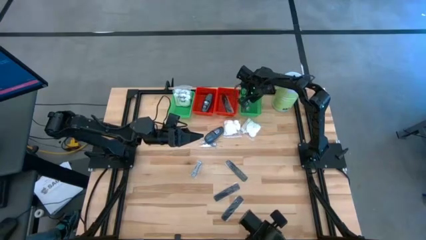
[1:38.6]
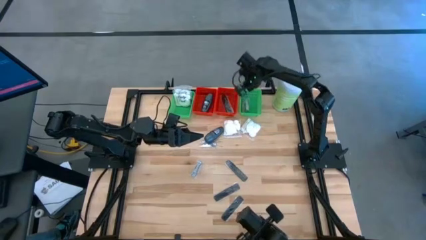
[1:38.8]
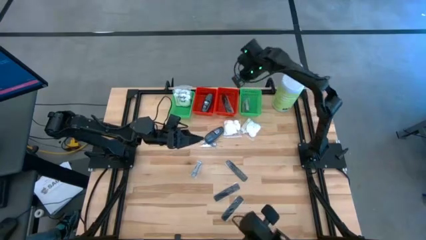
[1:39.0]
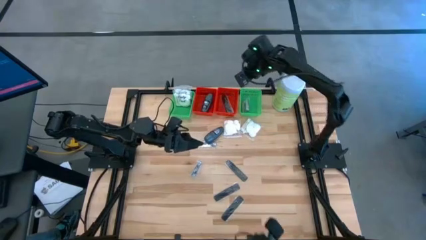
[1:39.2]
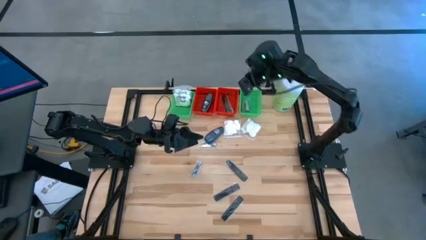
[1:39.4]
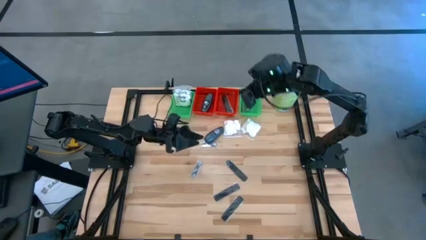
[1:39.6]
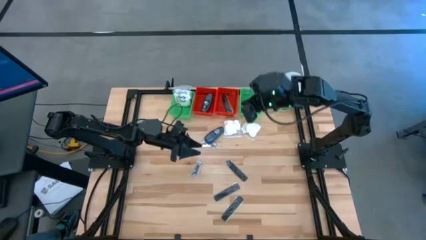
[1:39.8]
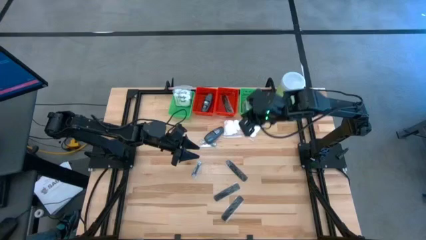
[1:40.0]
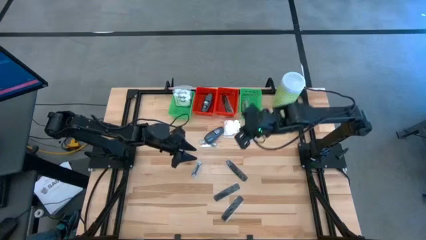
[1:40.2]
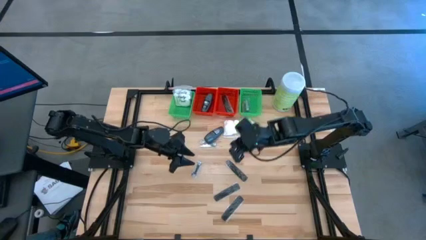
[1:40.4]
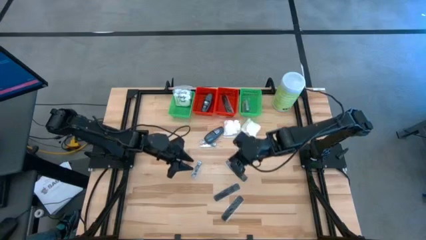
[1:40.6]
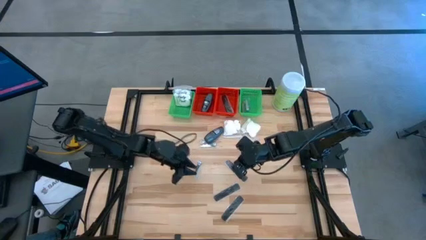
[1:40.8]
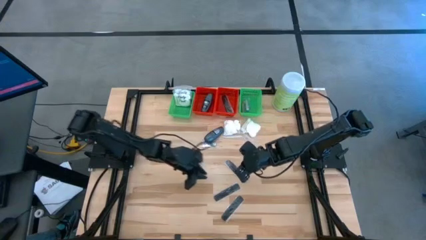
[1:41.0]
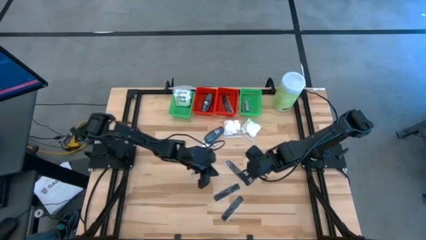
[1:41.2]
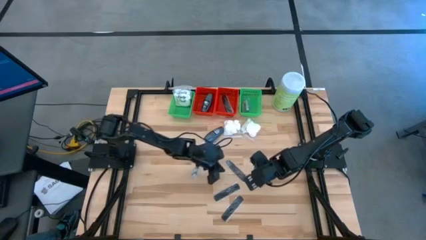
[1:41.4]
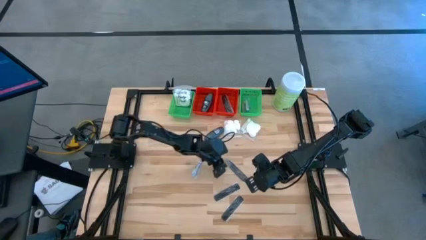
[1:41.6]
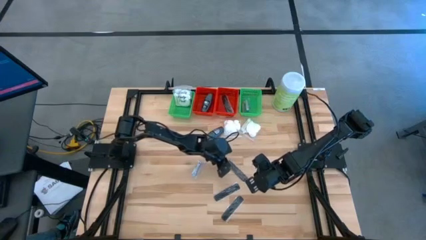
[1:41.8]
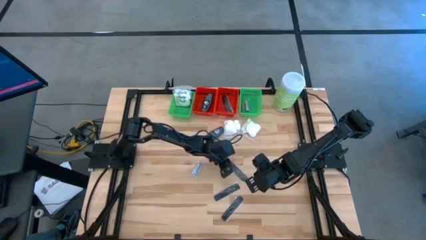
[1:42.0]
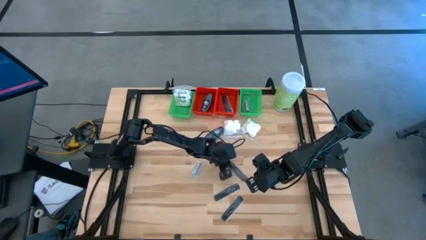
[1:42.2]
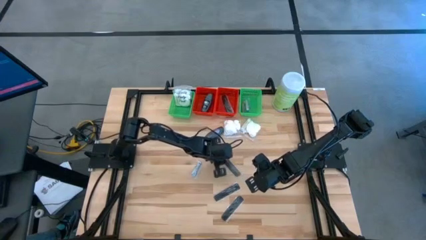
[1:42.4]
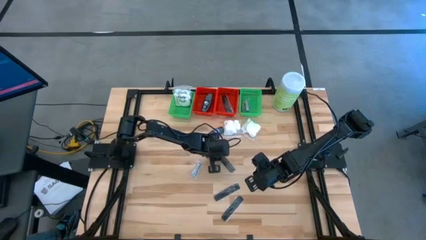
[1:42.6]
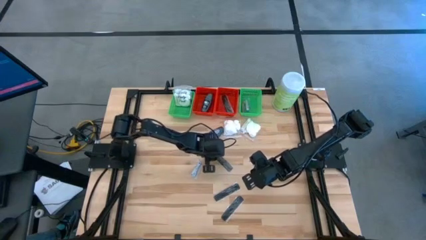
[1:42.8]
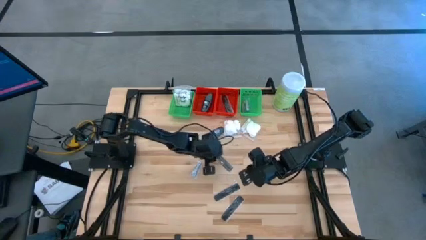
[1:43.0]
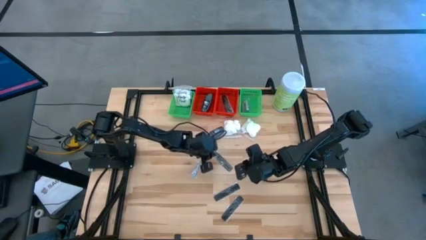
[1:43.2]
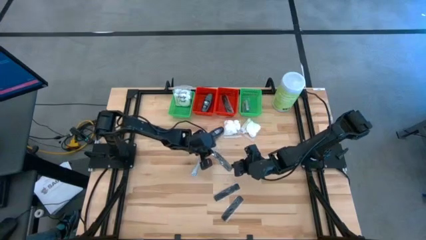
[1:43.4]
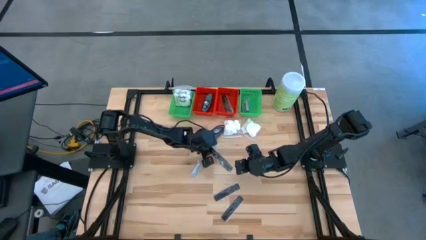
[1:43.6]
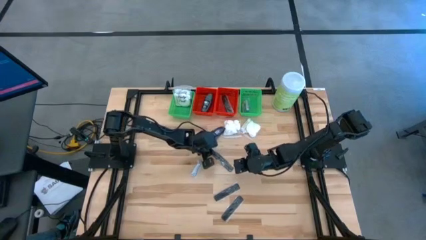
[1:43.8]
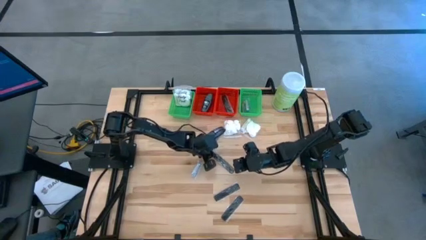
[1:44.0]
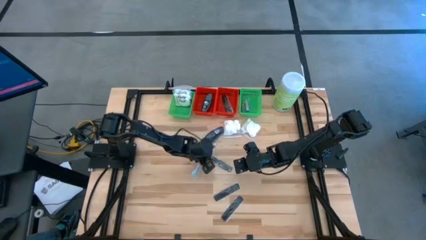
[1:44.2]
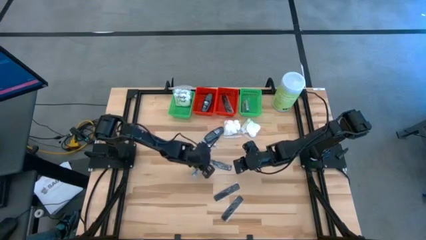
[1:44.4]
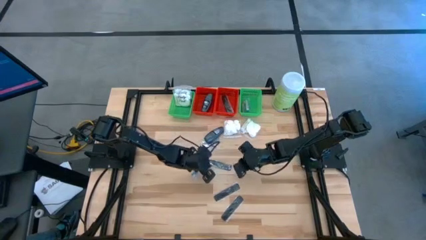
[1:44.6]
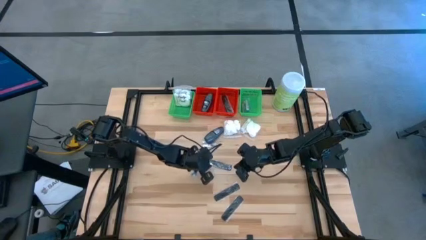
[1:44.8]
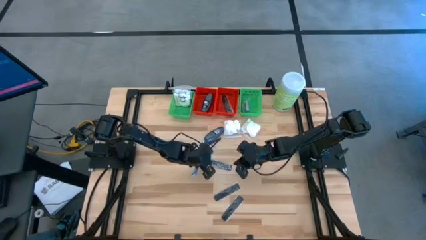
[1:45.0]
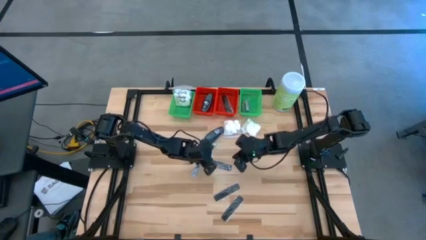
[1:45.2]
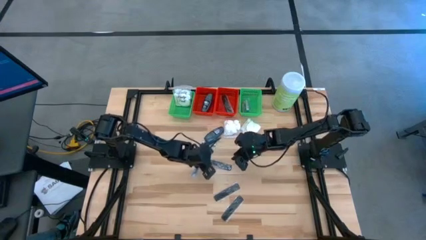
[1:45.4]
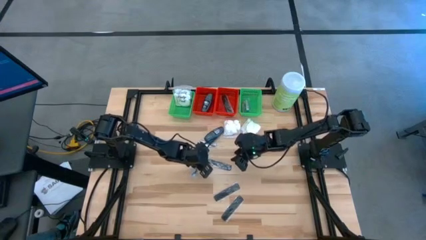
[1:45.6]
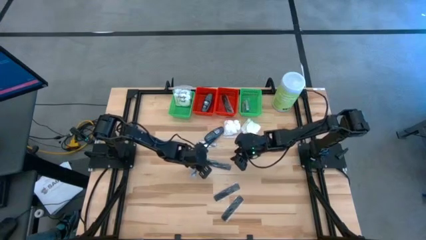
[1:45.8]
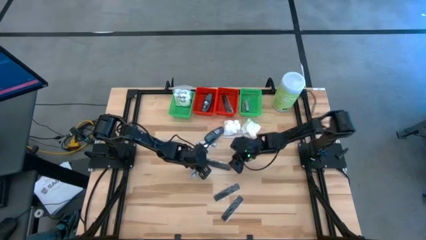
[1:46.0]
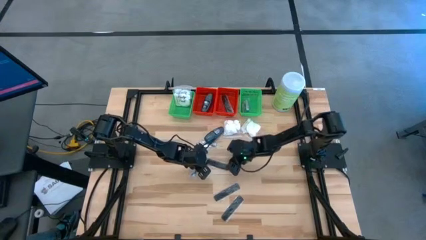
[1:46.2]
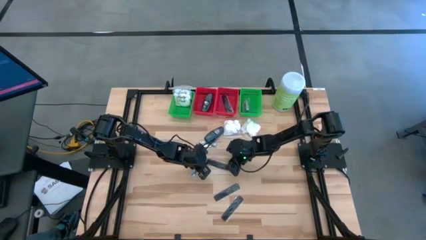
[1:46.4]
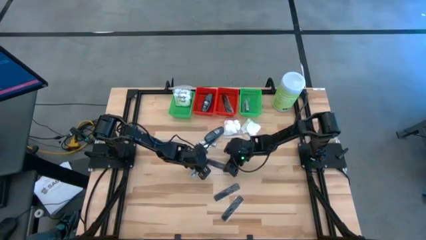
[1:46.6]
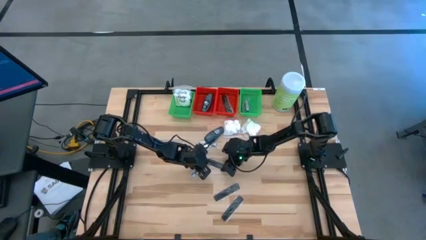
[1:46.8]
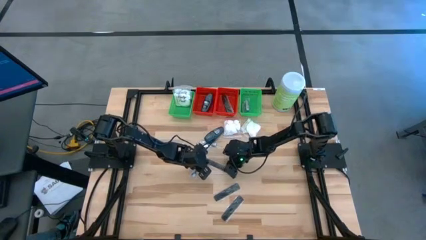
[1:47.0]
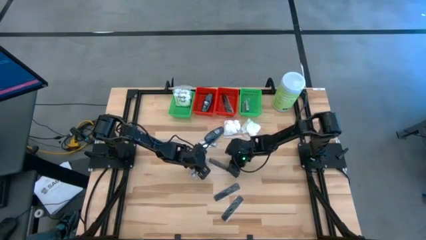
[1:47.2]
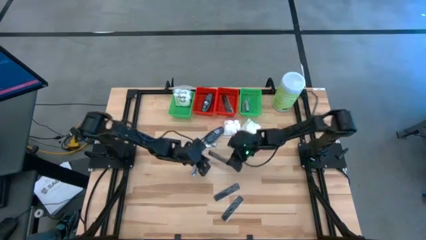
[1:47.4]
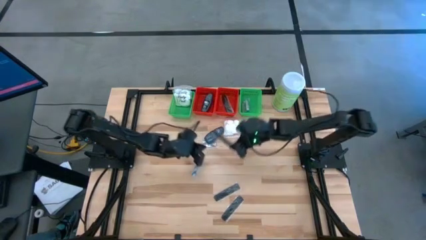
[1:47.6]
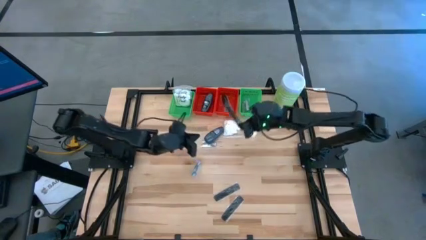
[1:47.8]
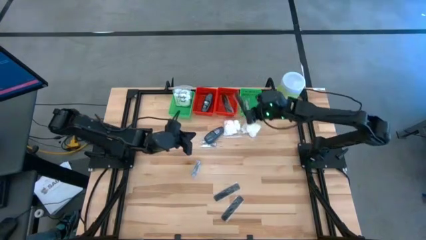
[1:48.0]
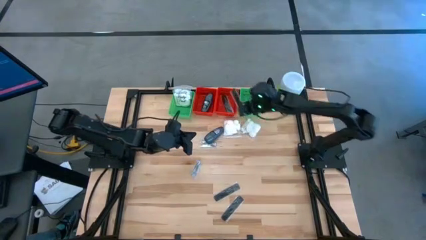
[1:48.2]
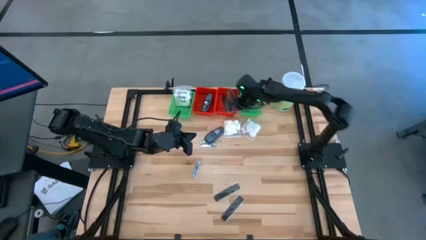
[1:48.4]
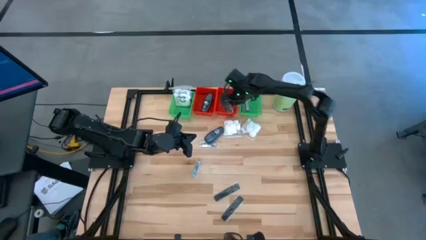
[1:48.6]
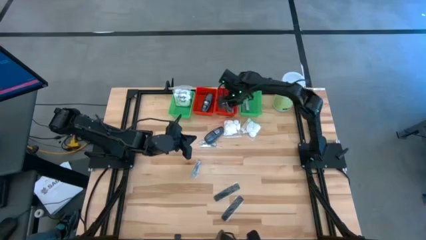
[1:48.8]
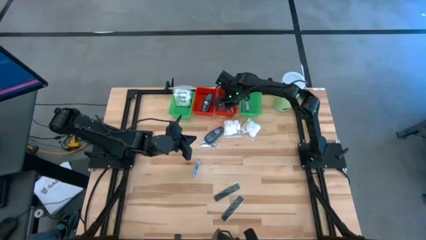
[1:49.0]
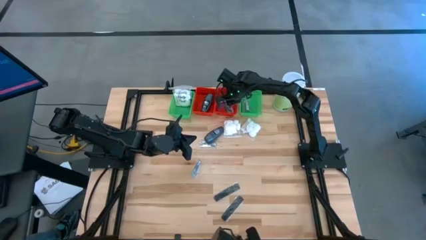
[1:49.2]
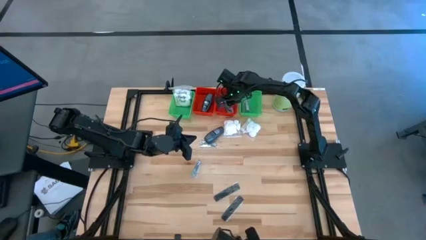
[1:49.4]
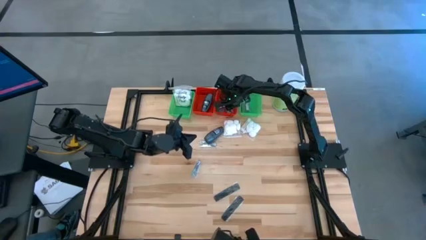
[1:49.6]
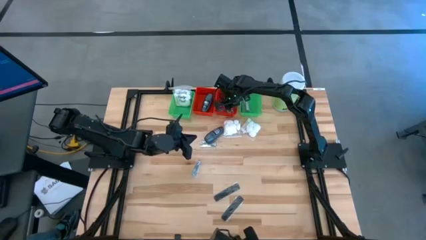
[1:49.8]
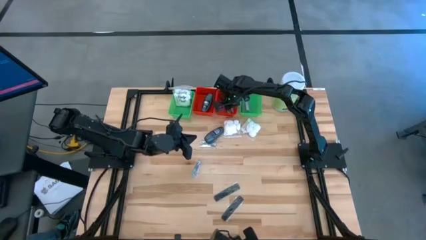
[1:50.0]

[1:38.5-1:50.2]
Task: Pick & Place Travel size toiletries
Put the comb into the right red basket

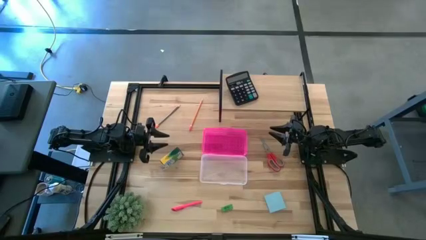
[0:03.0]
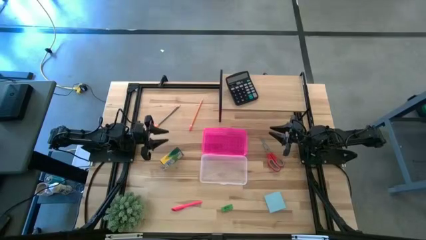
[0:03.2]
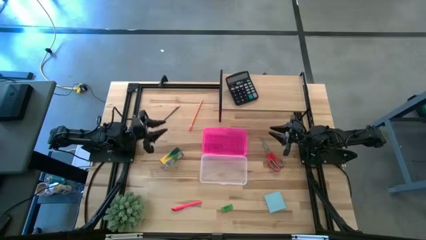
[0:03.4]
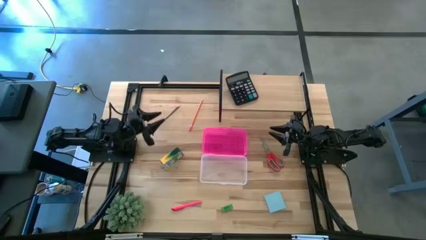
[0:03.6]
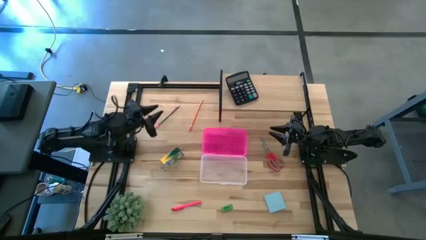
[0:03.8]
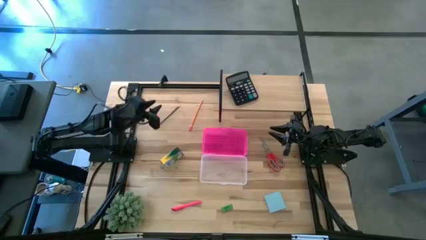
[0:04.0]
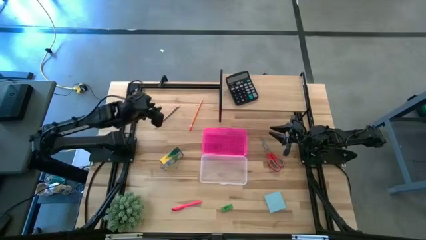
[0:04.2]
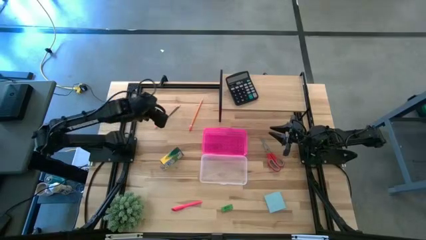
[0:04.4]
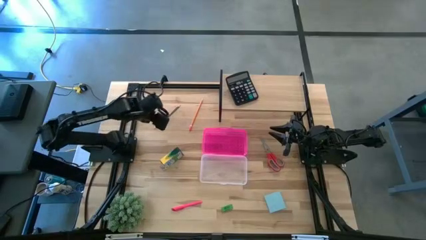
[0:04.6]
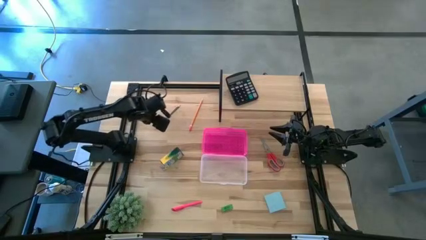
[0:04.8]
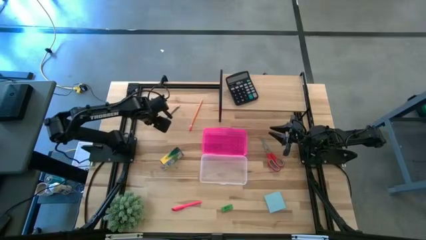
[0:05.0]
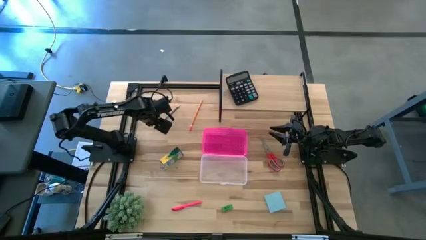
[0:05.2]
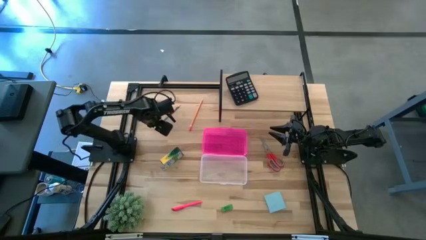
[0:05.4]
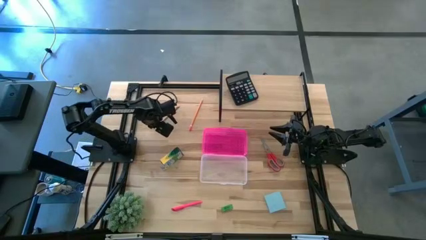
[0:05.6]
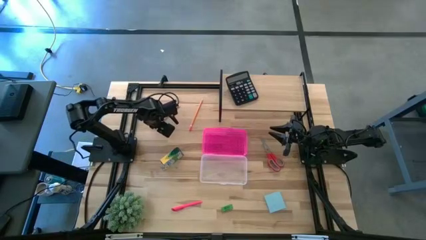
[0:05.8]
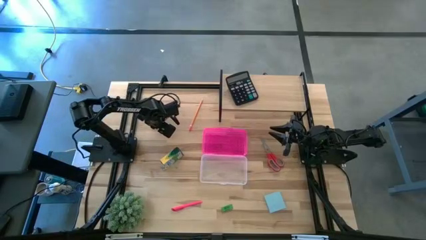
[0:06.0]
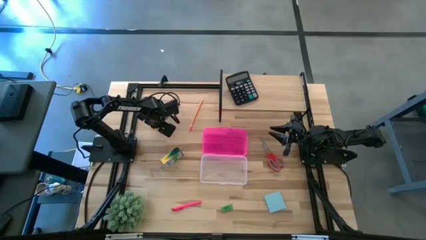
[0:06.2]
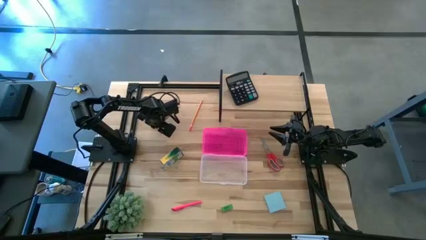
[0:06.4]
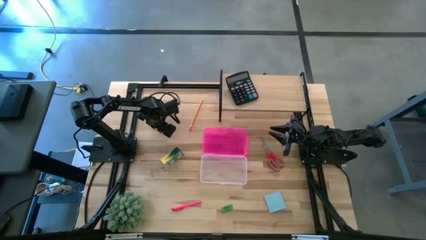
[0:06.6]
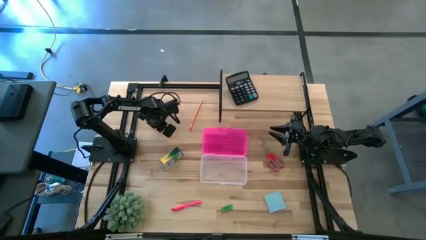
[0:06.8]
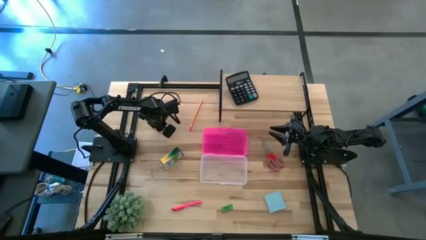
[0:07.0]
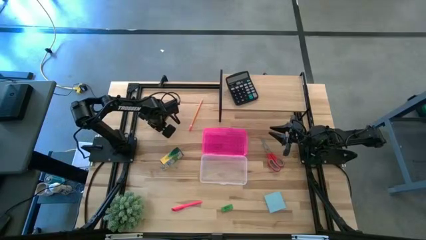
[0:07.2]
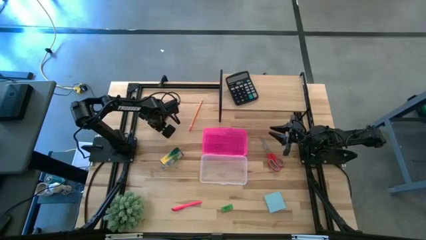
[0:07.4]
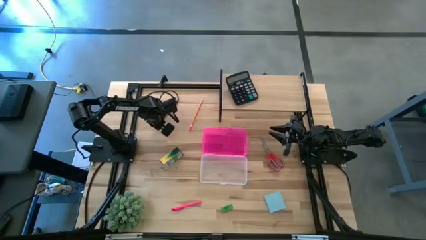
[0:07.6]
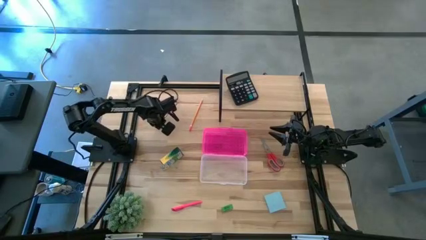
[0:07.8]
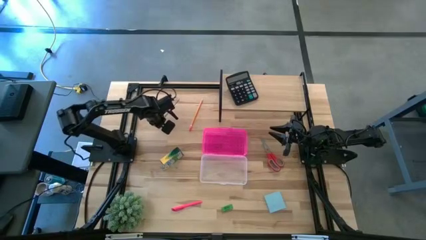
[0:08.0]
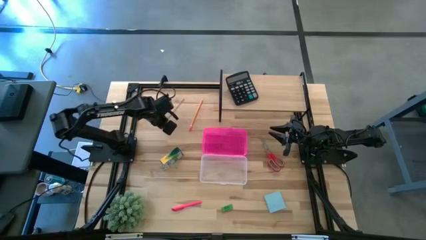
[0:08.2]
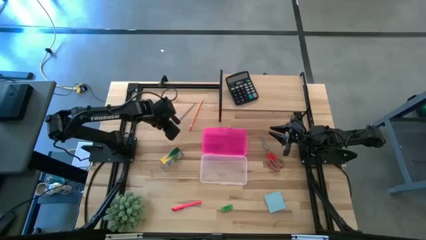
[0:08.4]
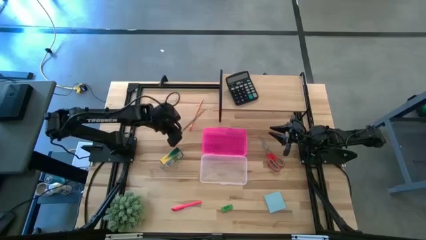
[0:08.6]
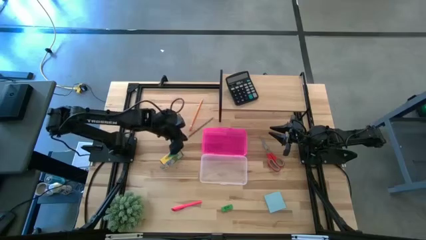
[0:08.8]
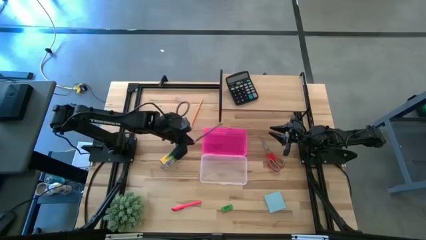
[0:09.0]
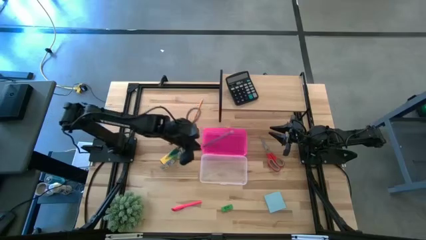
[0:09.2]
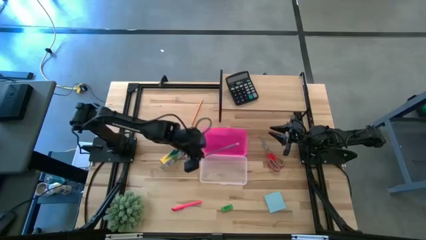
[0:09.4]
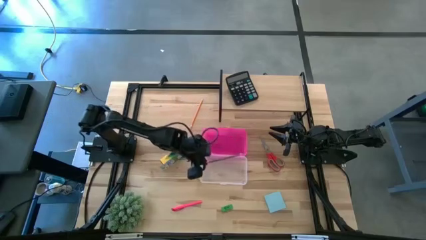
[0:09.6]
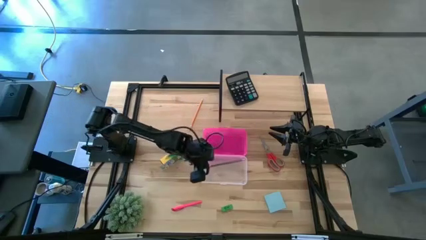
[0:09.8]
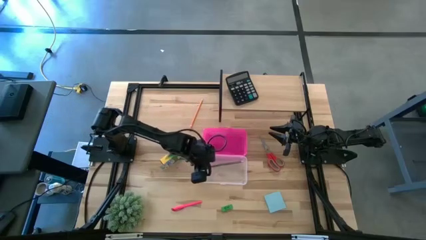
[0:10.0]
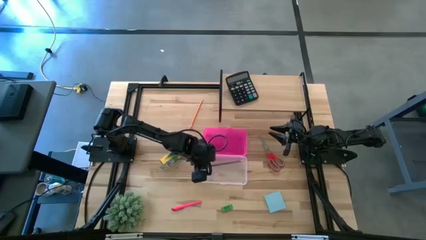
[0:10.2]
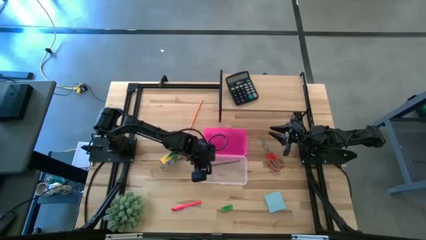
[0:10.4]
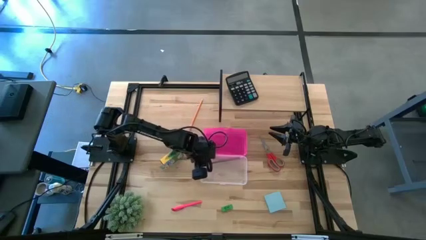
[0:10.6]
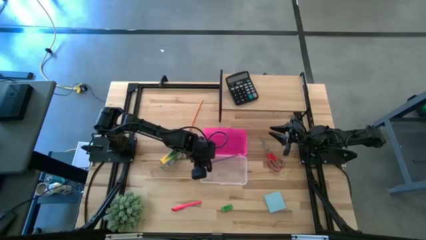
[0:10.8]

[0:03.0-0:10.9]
Task: Pack school essentials
Put the blue pencil into the supply box
